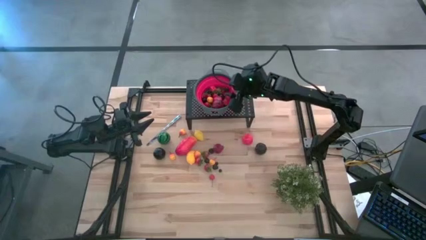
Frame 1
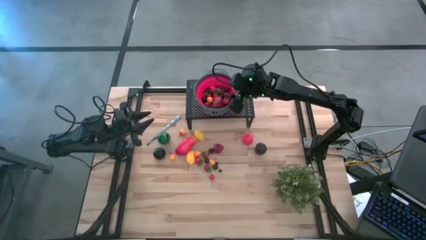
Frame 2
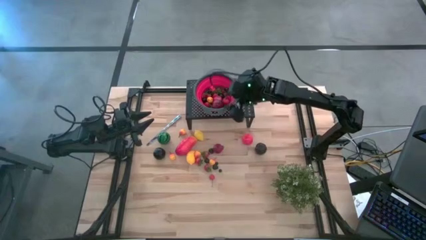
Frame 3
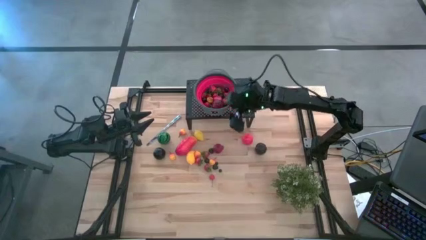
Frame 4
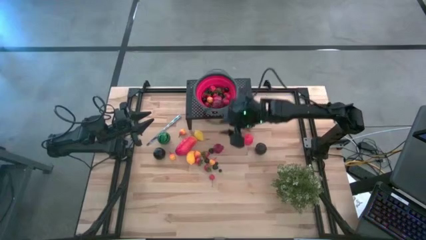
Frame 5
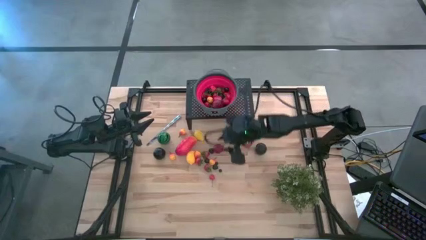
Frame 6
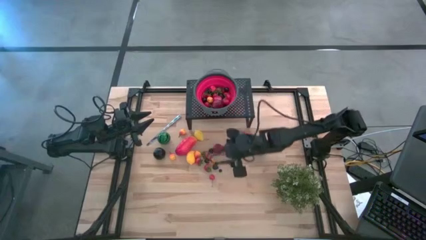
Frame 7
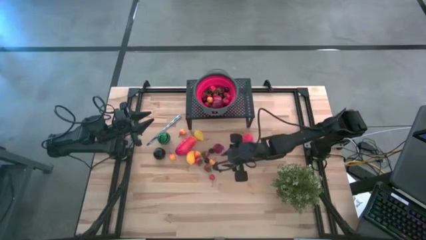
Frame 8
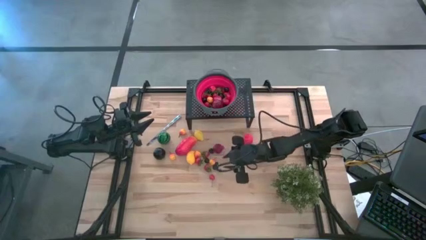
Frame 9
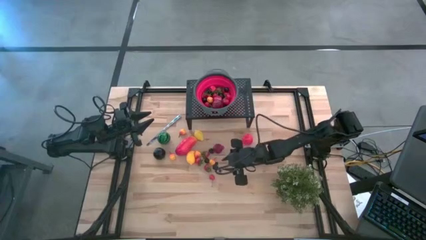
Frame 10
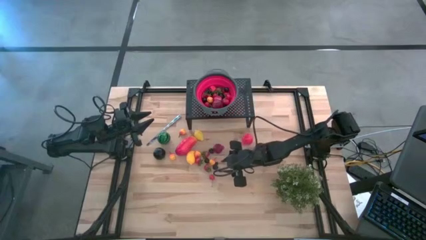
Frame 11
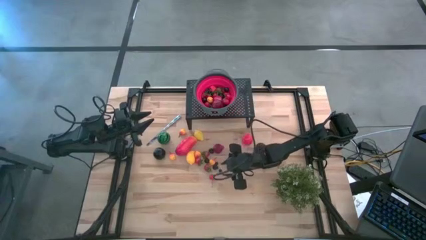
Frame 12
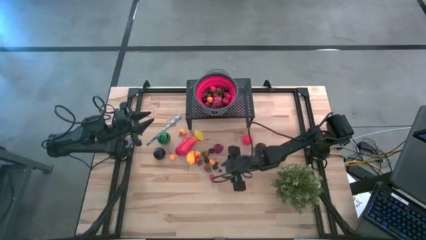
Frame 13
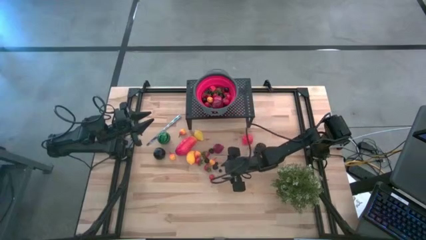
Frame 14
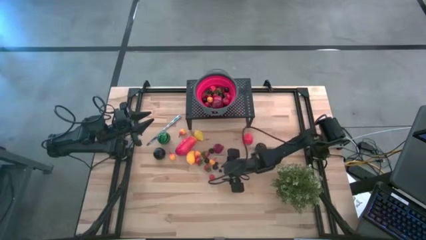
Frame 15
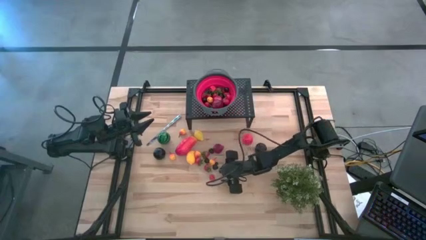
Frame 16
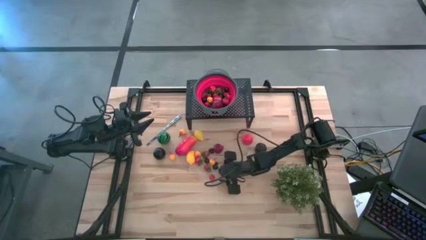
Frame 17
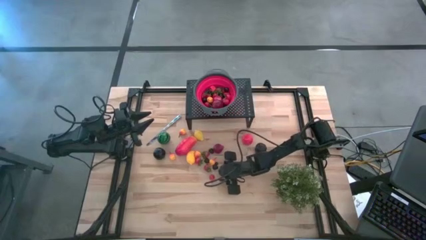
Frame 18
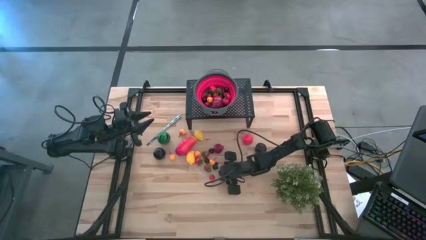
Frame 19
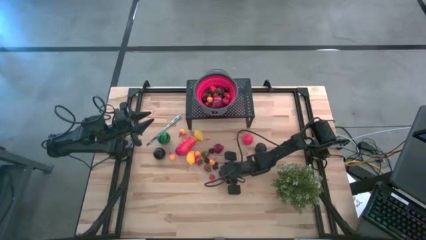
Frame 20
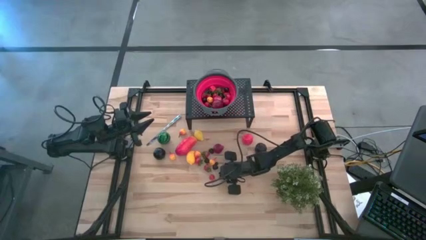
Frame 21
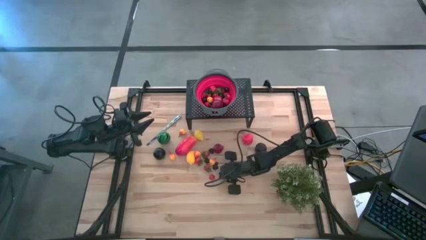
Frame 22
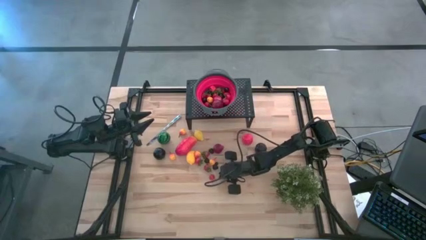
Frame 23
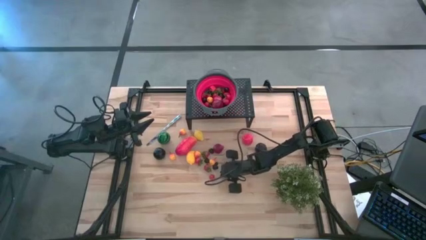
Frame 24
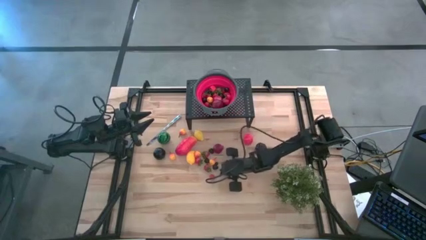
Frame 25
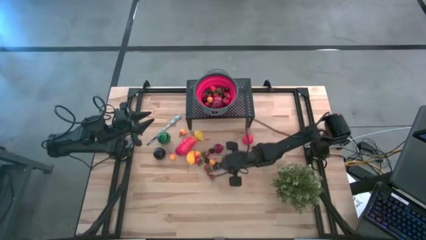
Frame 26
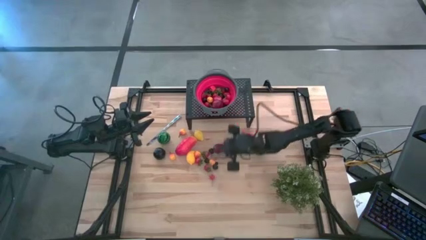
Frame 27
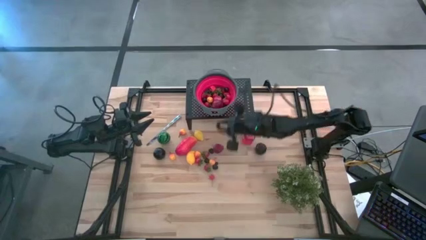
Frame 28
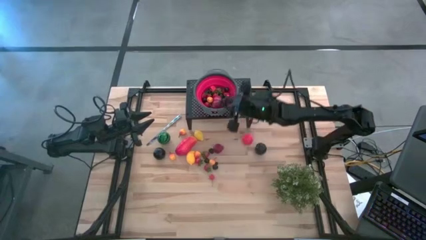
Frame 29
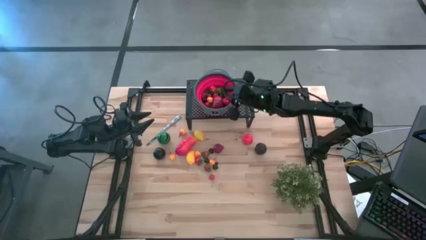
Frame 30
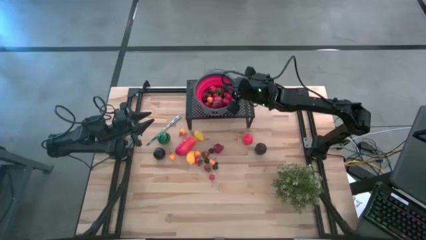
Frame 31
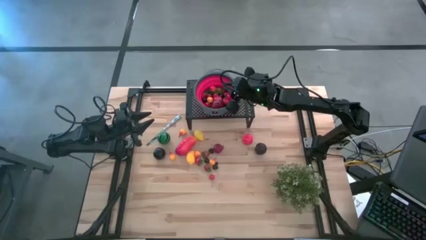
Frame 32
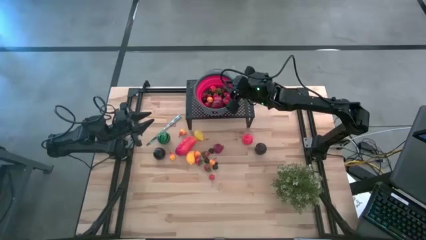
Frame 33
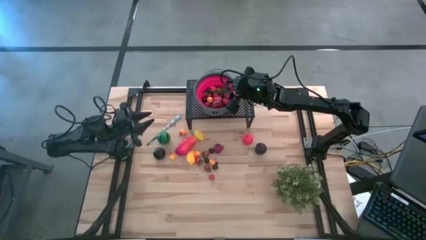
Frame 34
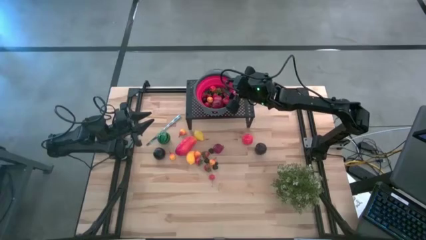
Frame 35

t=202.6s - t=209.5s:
Task: Pick & Place Fruit
Put the blueberry in the red colander on the shelf

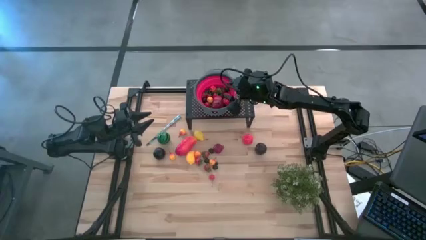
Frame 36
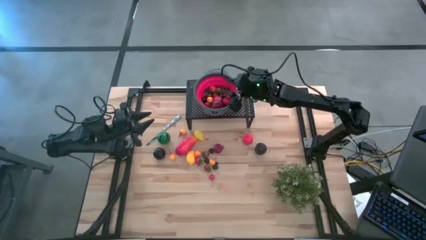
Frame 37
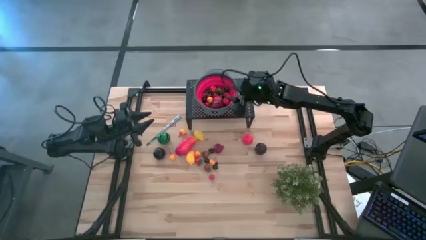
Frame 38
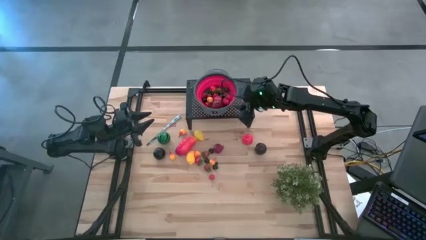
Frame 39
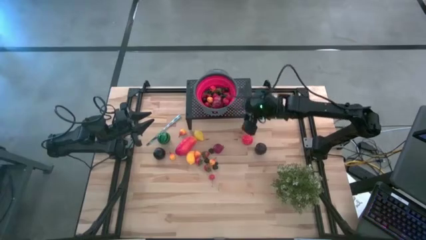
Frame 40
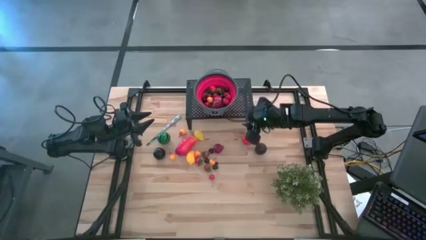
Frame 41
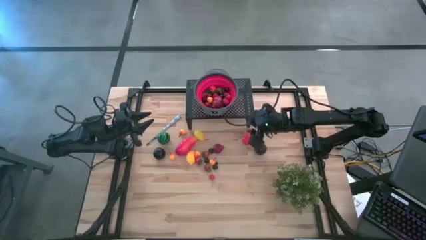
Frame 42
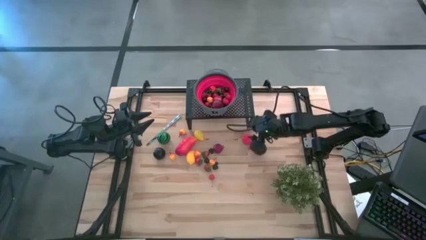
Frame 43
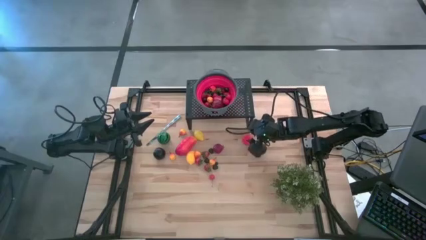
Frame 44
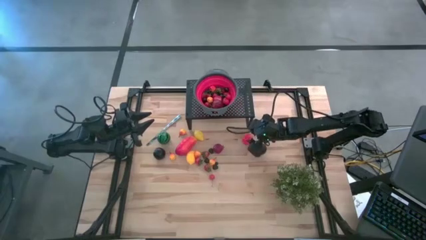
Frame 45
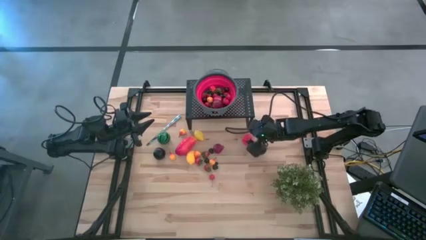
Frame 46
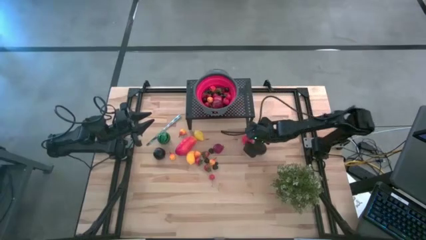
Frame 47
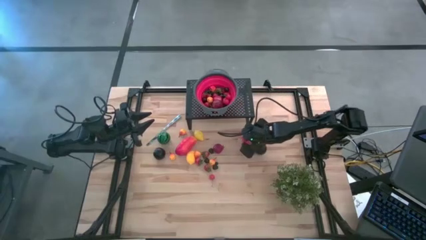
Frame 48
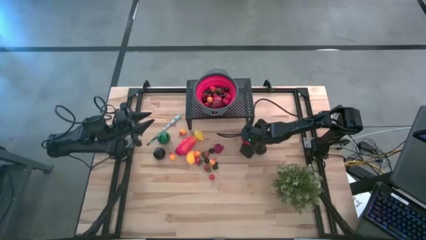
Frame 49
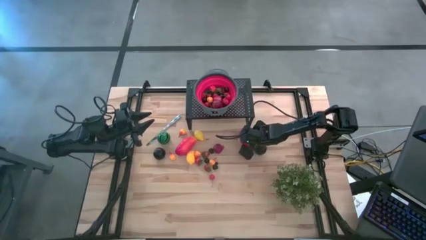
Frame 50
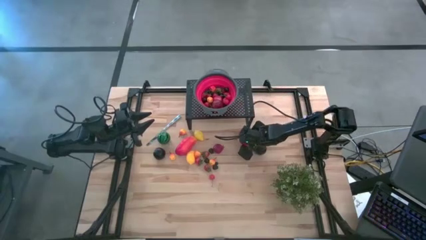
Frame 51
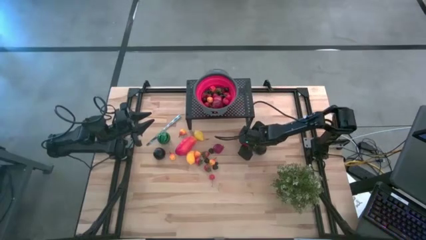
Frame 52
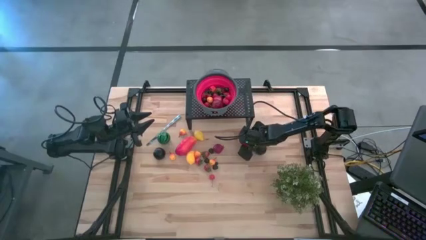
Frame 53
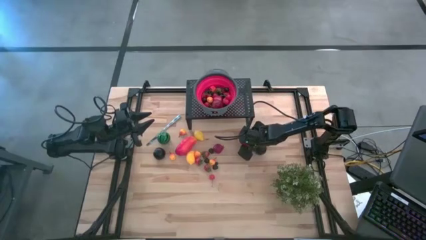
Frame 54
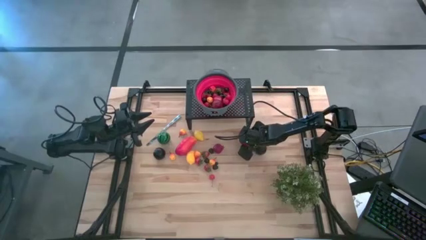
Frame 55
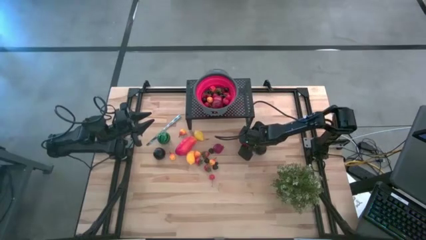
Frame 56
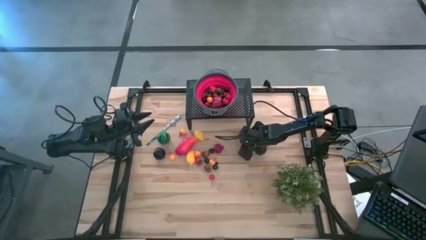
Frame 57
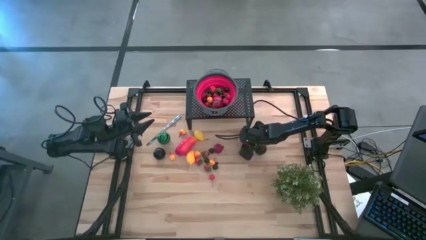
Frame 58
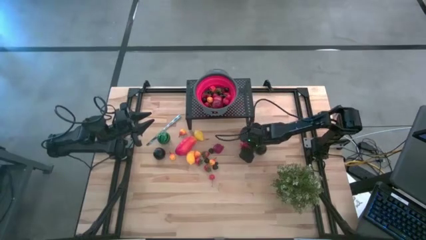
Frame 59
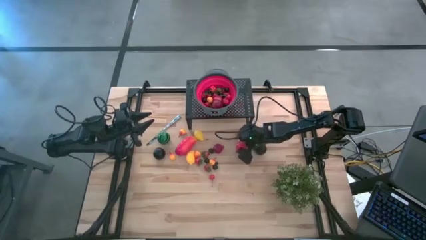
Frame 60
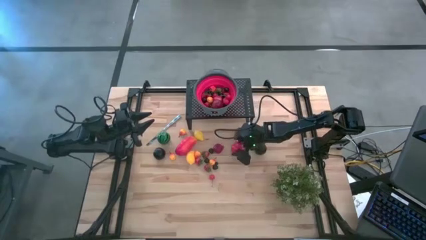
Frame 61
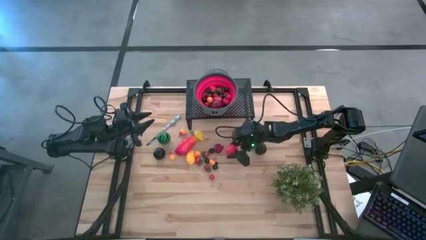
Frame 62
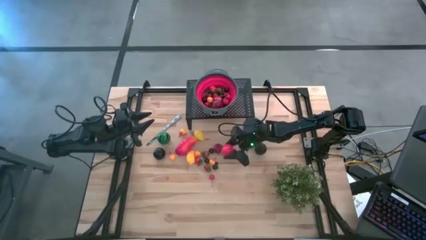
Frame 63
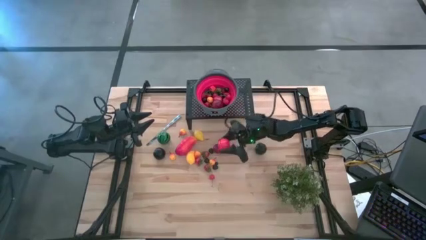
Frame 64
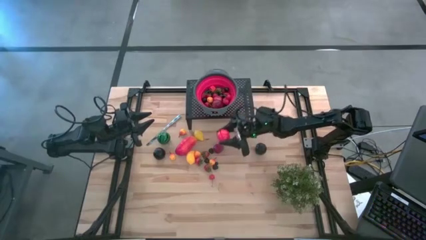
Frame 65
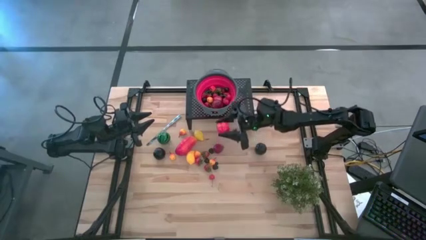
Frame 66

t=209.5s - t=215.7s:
Put the tomato in the red colander on the shelf

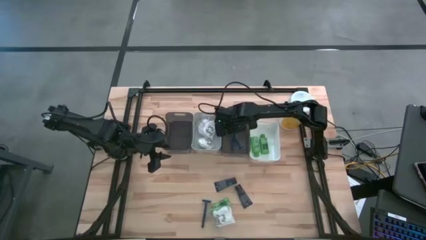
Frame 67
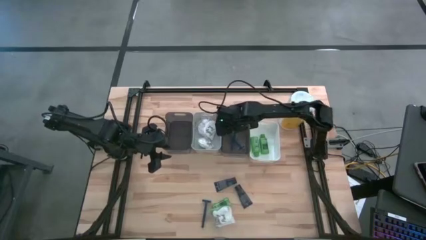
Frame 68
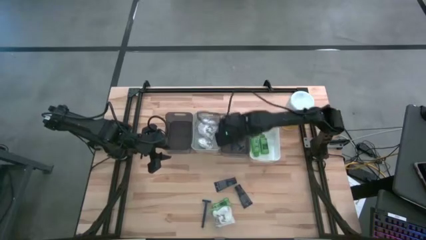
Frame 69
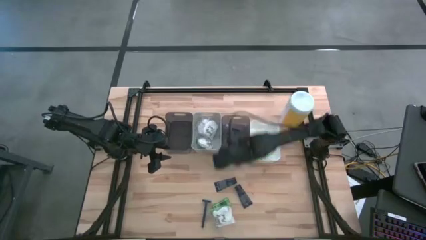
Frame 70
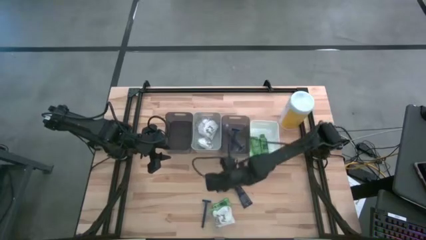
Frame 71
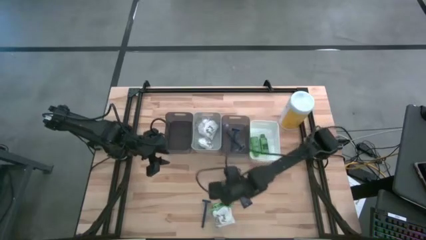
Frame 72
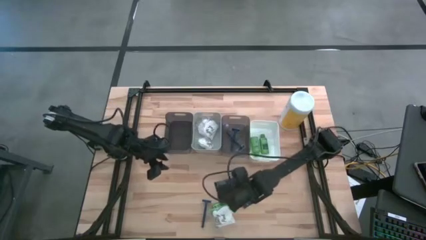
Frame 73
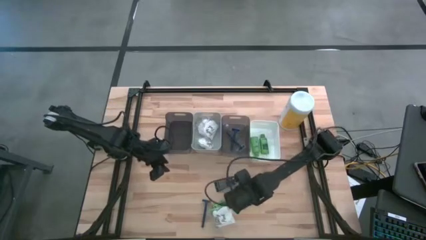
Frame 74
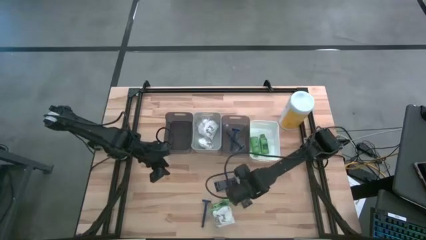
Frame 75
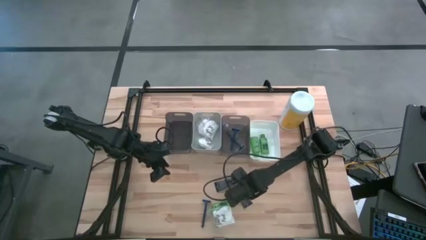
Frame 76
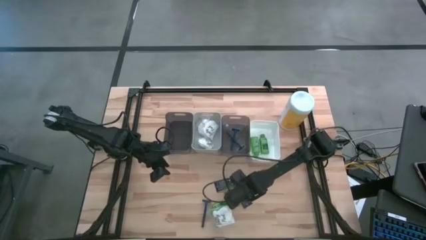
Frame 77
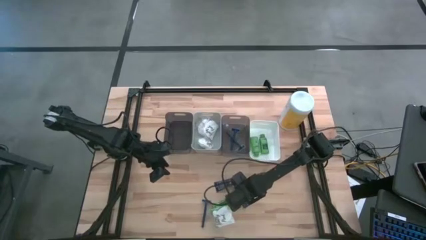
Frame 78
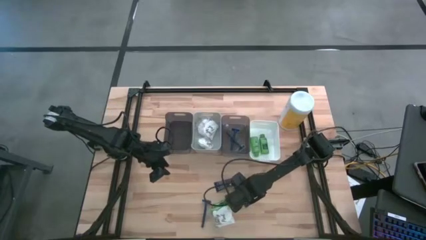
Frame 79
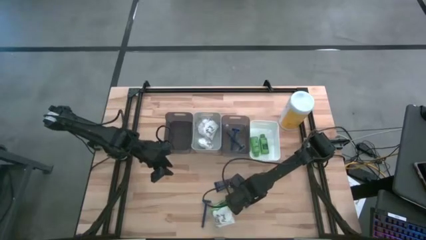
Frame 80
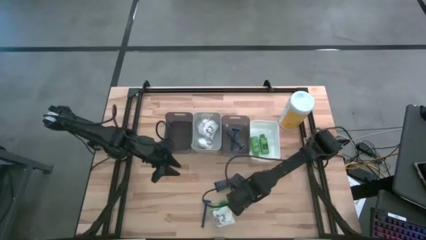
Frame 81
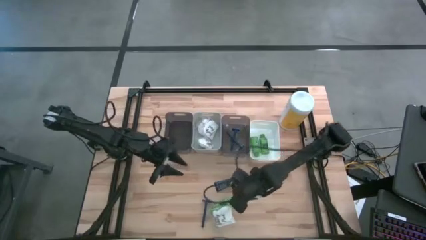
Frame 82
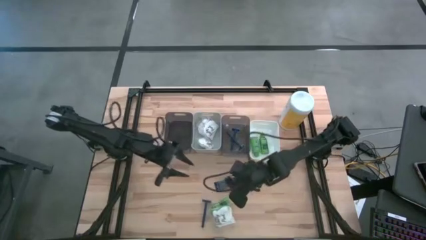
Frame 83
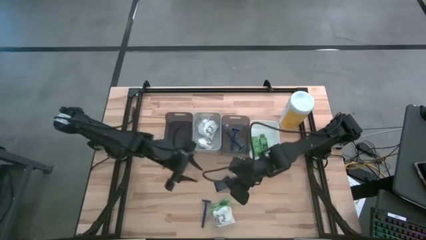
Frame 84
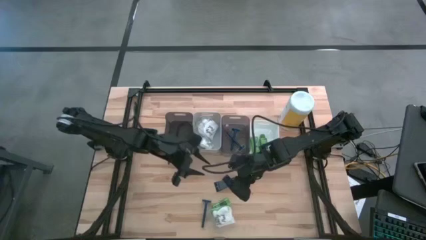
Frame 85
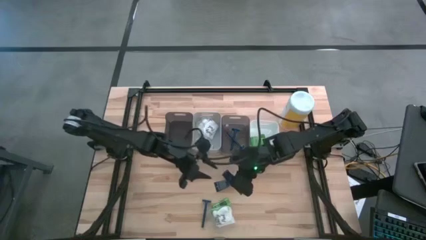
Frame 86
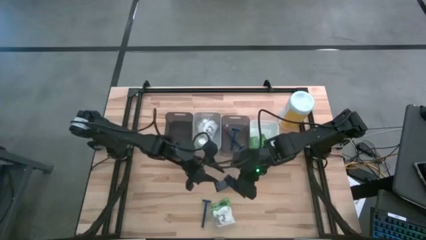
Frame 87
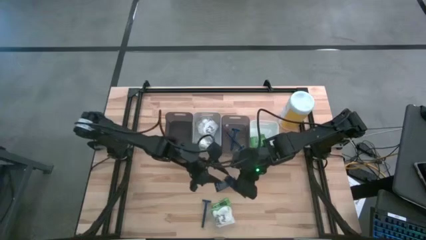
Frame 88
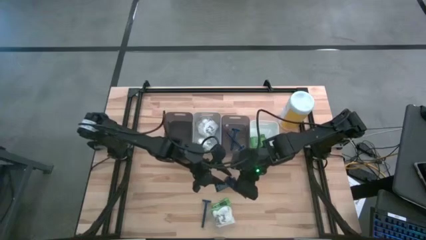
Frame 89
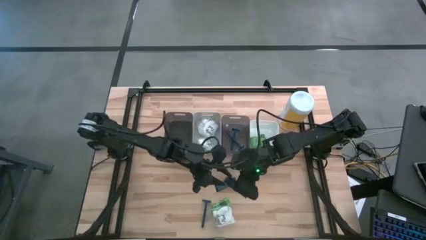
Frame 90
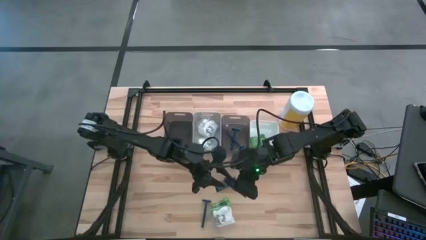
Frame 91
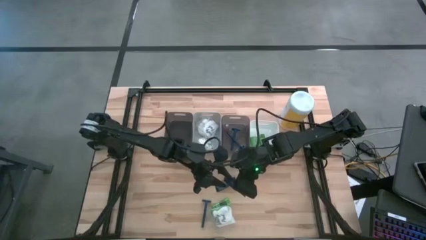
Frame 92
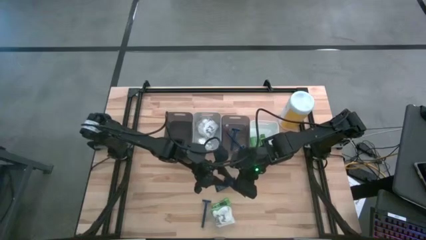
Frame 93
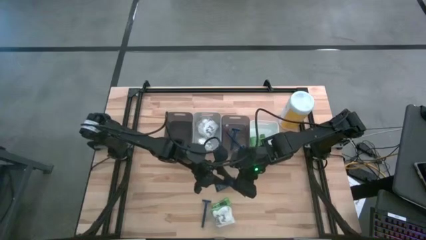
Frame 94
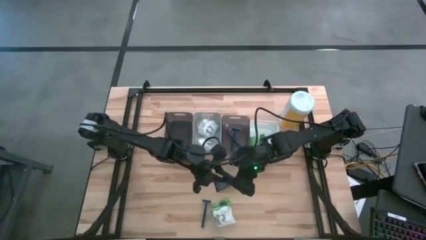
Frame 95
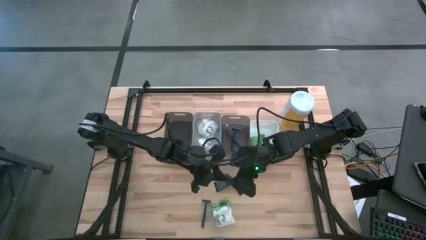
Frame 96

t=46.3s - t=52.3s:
Task: Pick & Place Travel size toiletries
Put the blue shave cream into the left black bin
